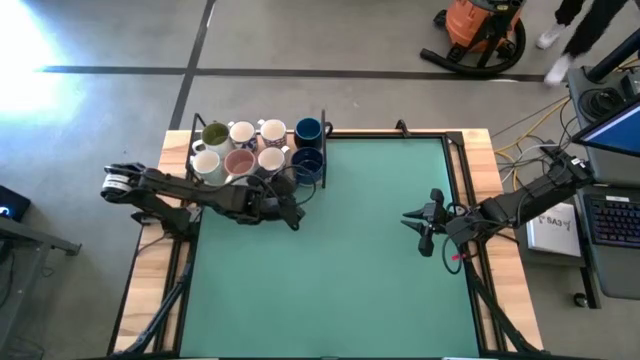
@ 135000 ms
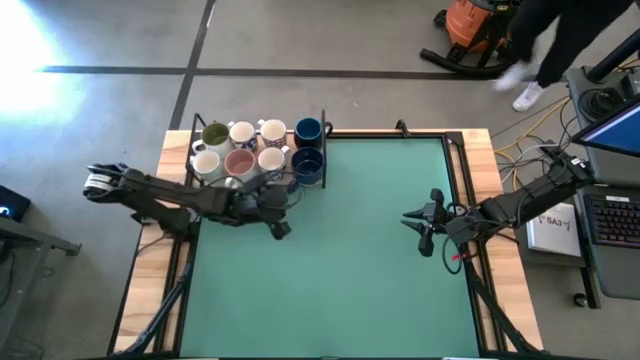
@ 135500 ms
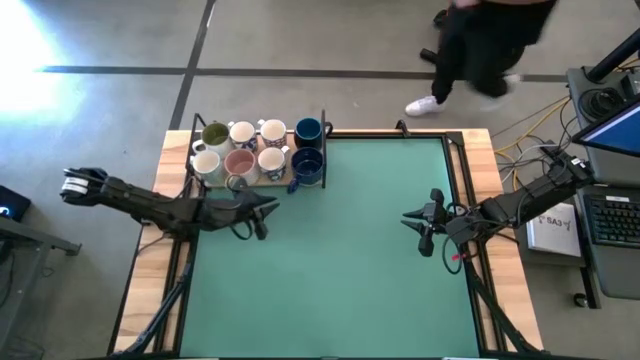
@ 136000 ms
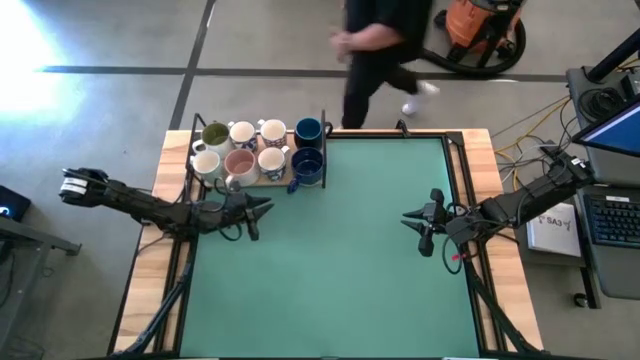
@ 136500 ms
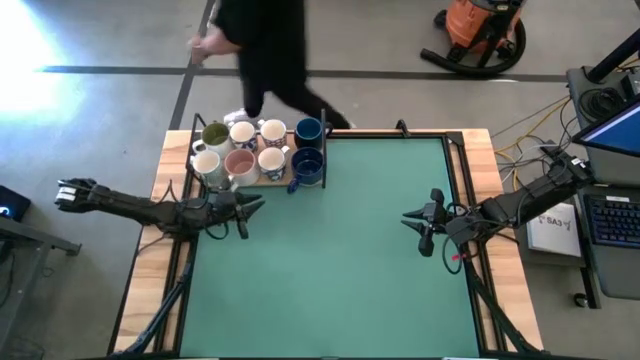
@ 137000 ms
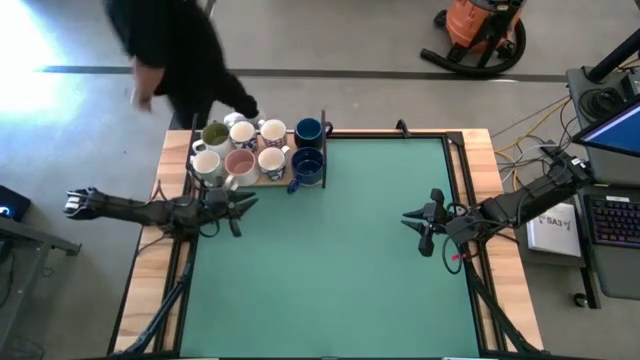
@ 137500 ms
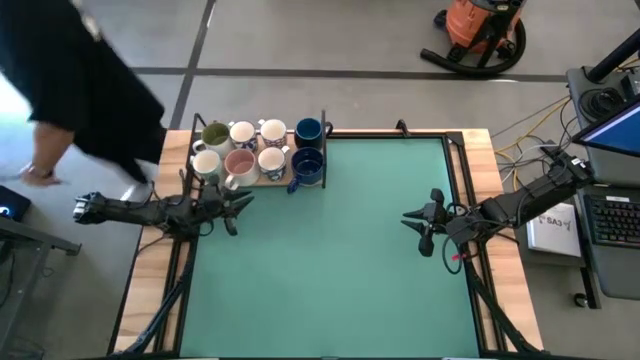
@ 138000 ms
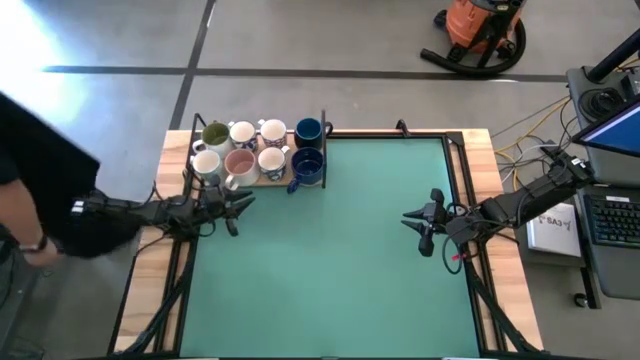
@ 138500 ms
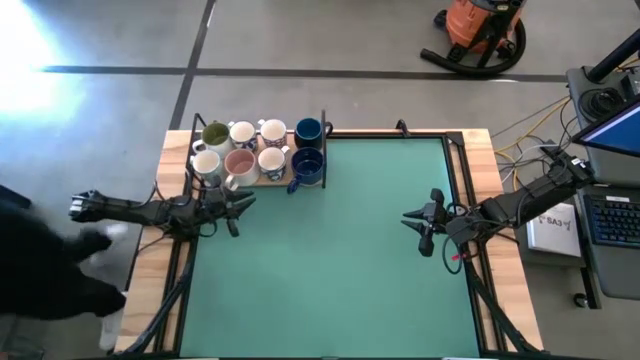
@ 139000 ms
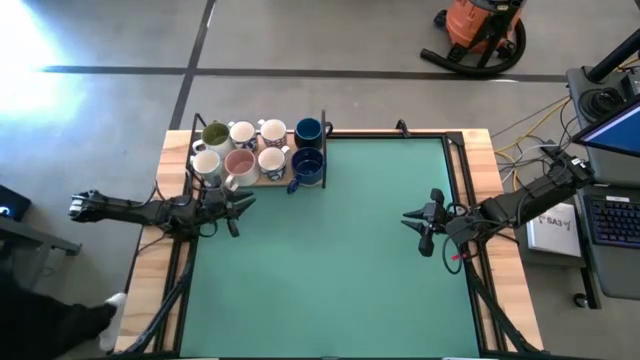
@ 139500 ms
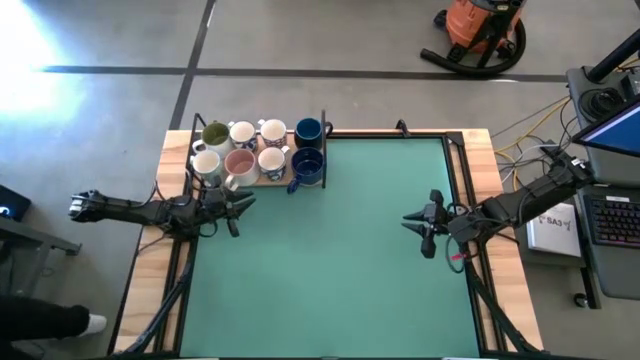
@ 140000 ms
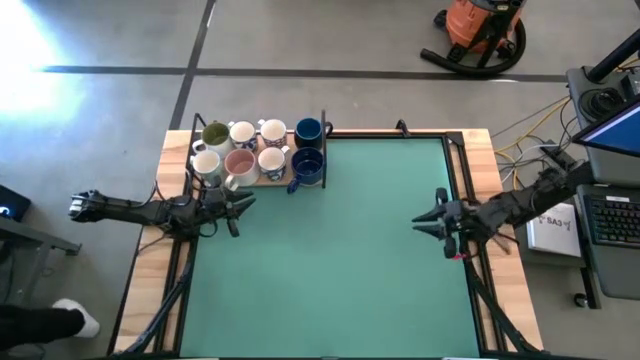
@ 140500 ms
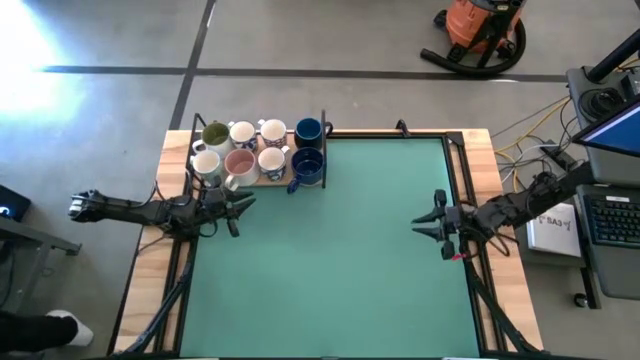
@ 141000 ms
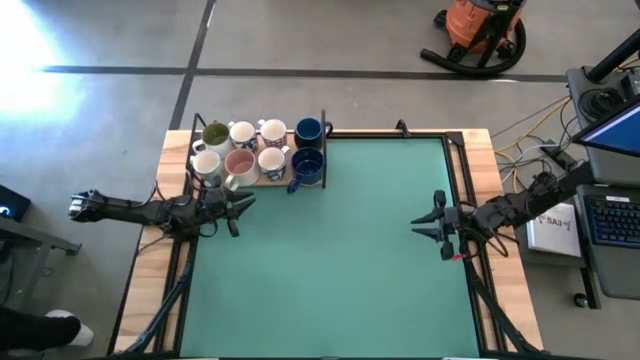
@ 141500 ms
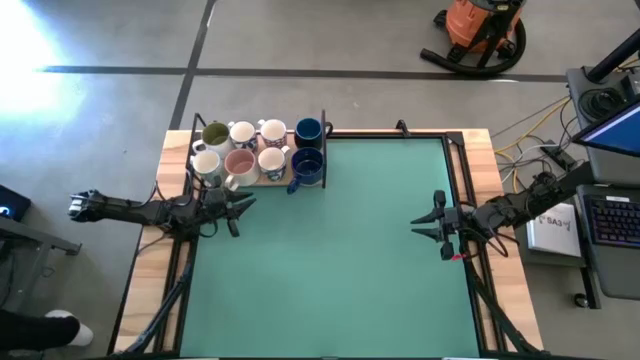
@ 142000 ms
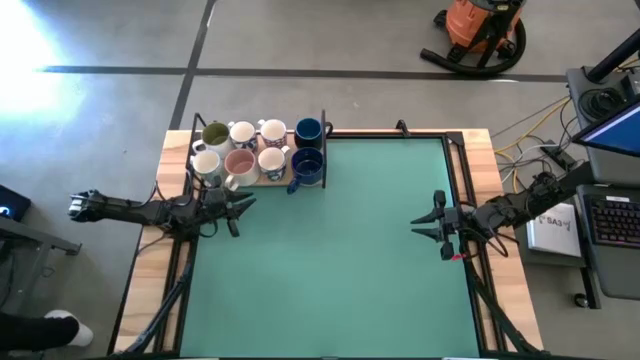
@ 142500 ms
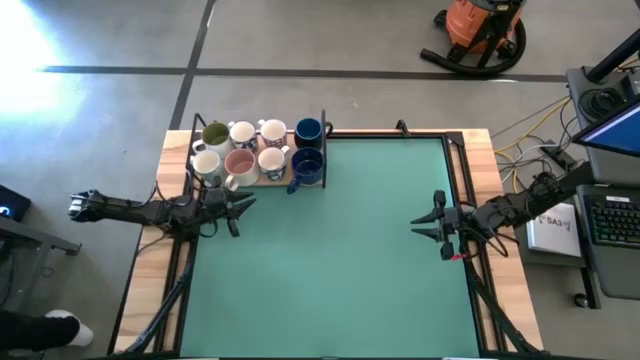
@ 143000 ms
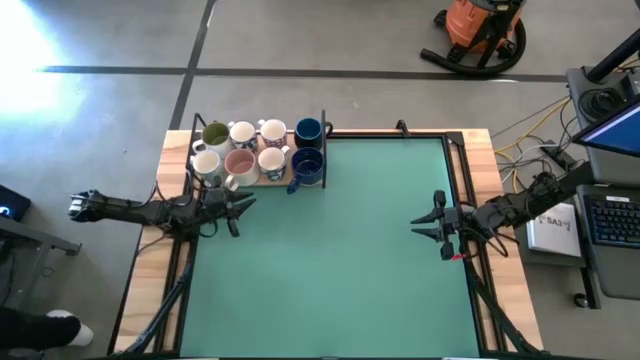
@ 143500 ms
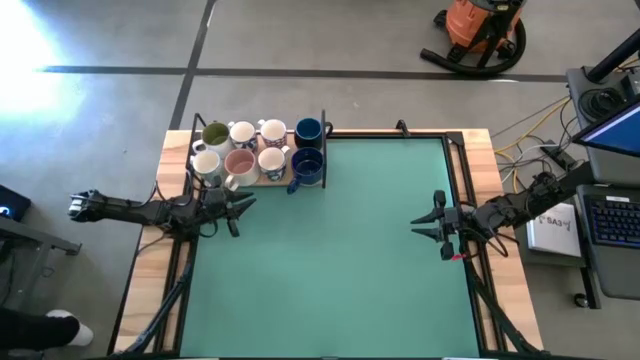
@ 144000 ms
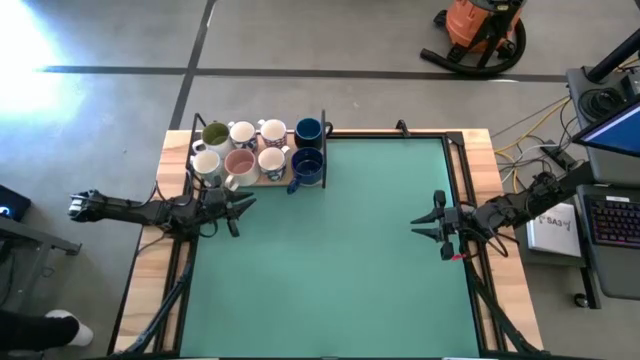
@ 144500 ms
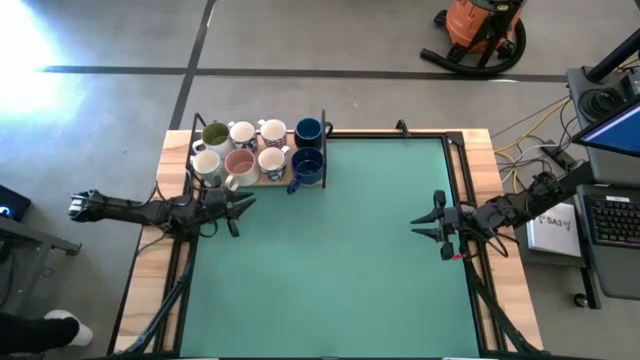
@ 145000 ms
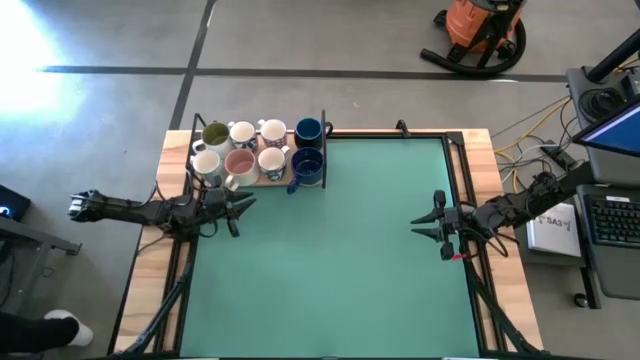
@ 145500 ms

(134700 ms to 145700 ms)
Task: Place coffee mugs
Return to Home Position

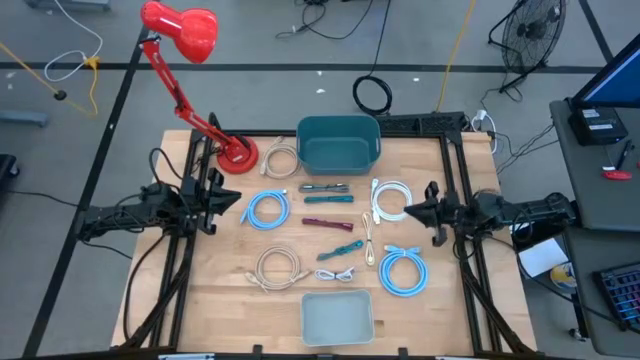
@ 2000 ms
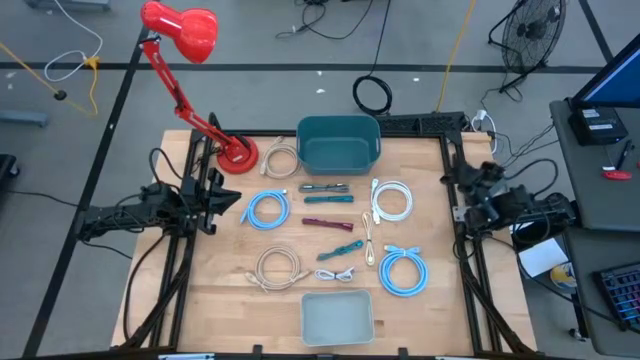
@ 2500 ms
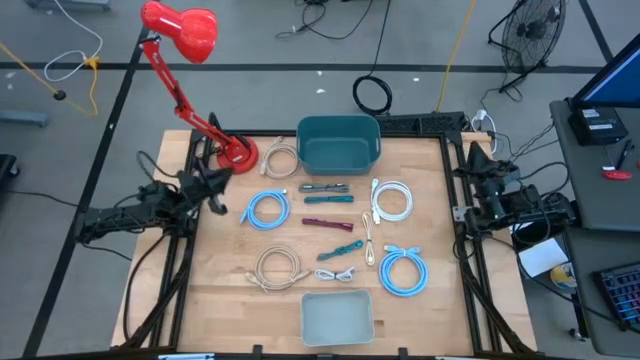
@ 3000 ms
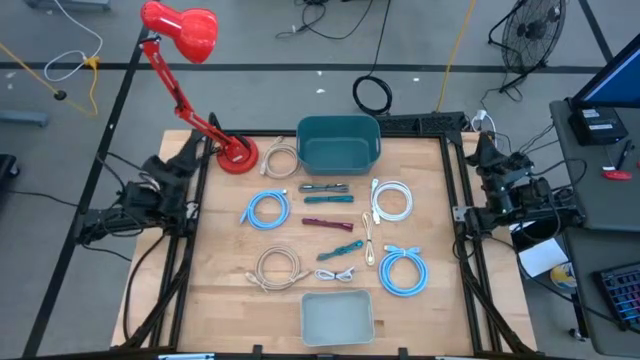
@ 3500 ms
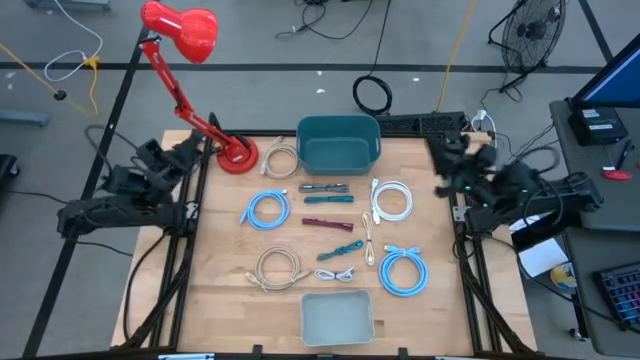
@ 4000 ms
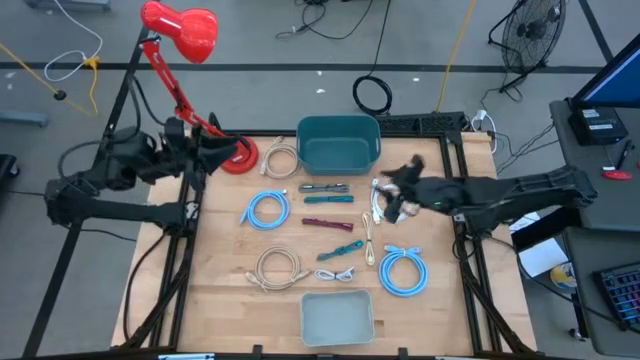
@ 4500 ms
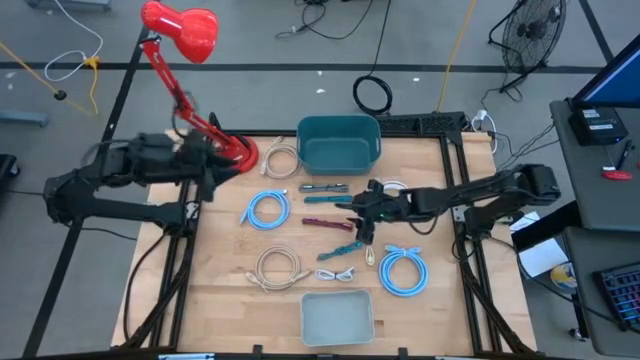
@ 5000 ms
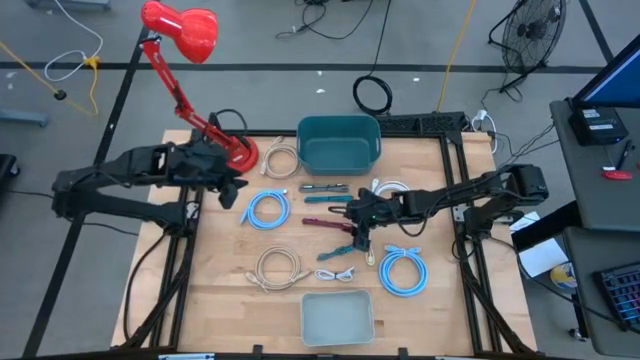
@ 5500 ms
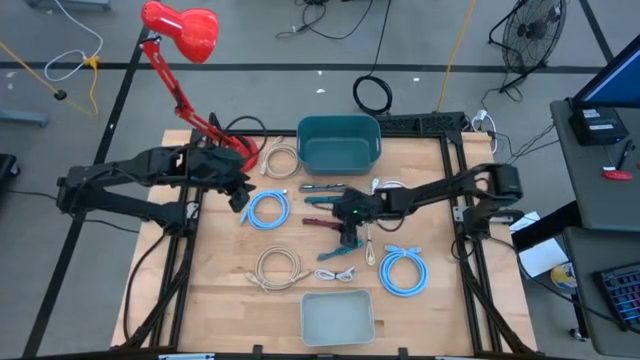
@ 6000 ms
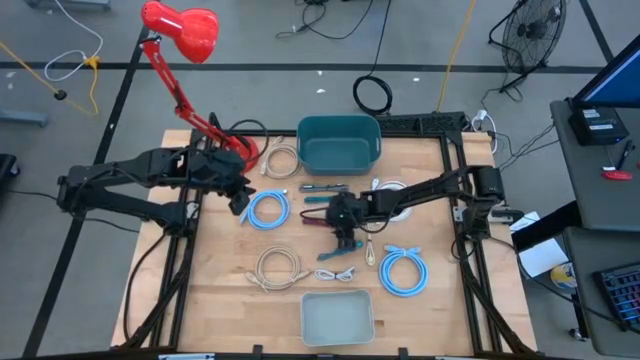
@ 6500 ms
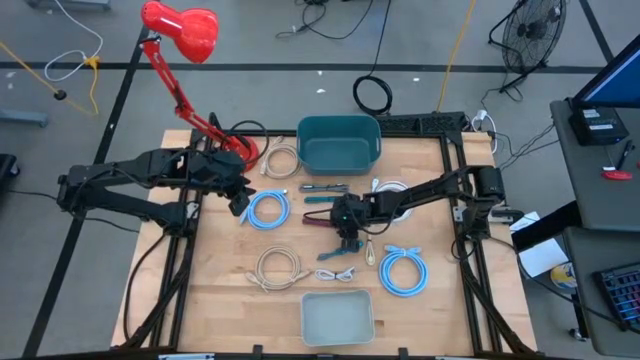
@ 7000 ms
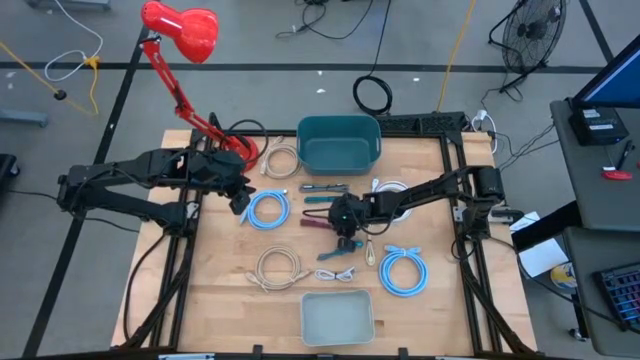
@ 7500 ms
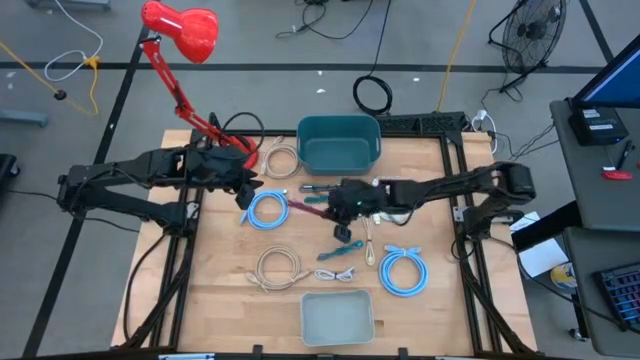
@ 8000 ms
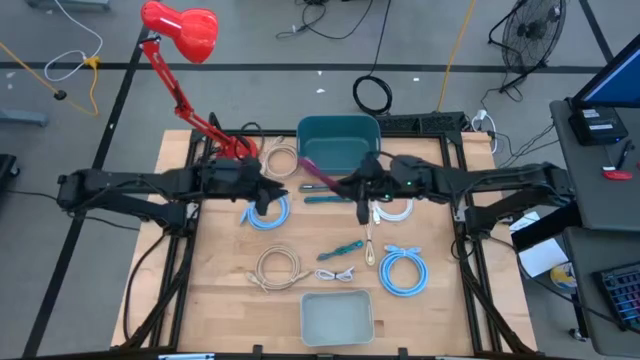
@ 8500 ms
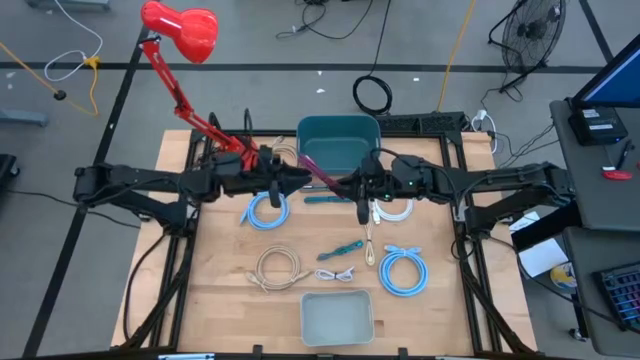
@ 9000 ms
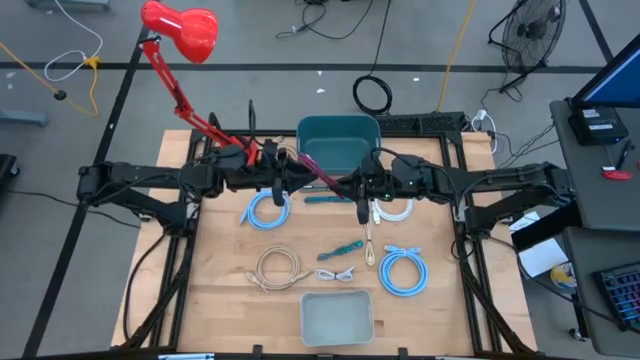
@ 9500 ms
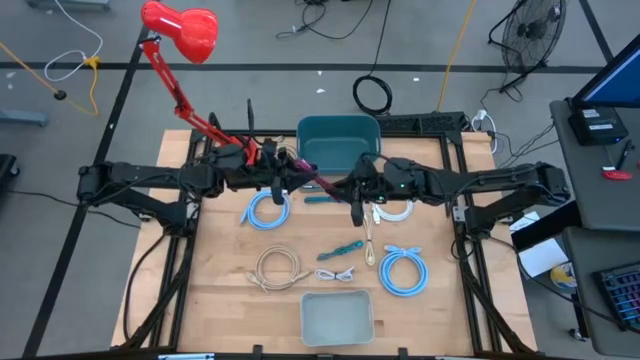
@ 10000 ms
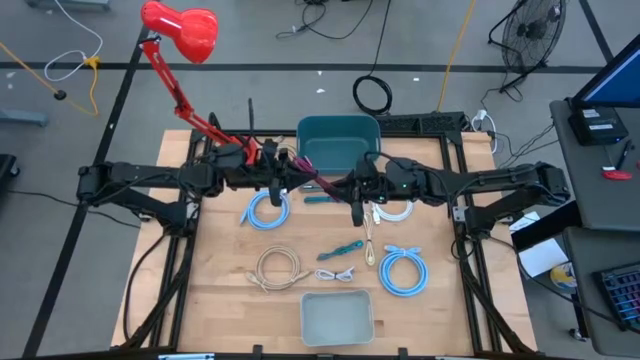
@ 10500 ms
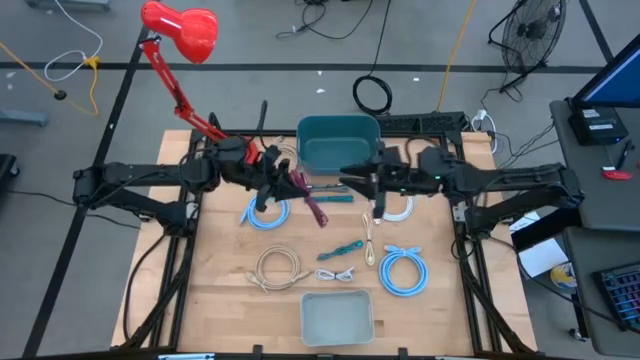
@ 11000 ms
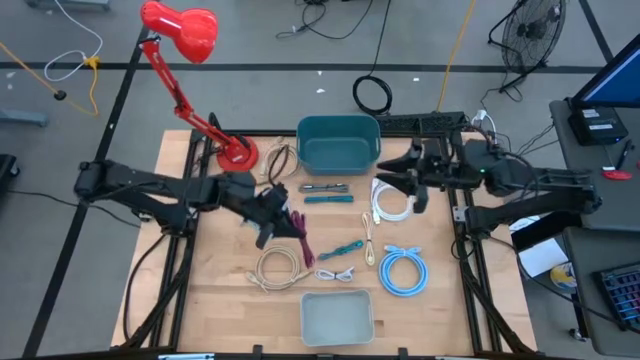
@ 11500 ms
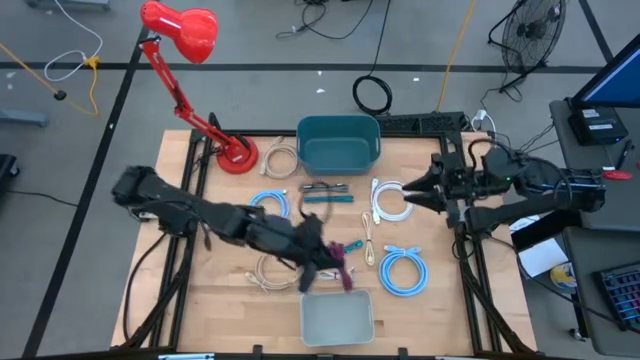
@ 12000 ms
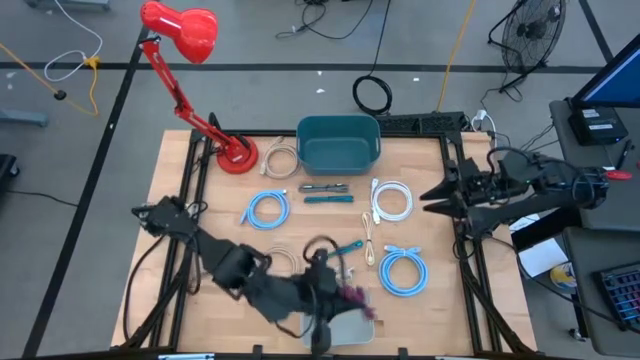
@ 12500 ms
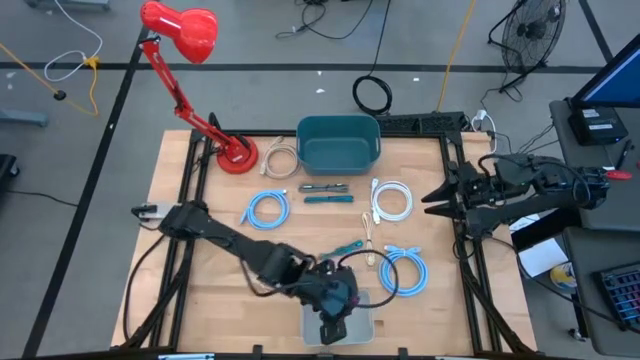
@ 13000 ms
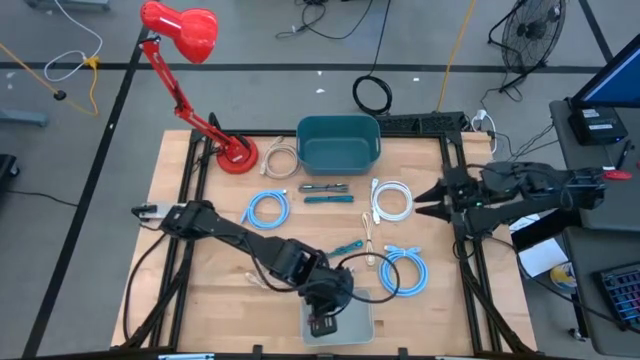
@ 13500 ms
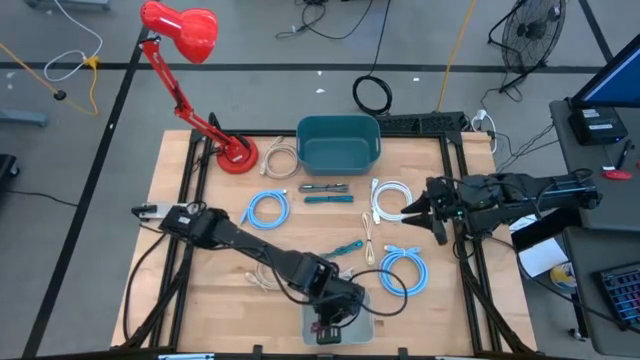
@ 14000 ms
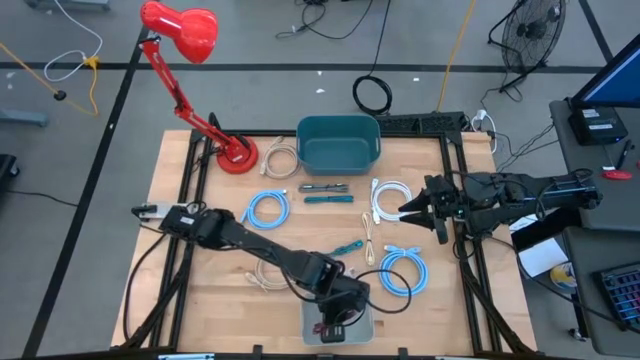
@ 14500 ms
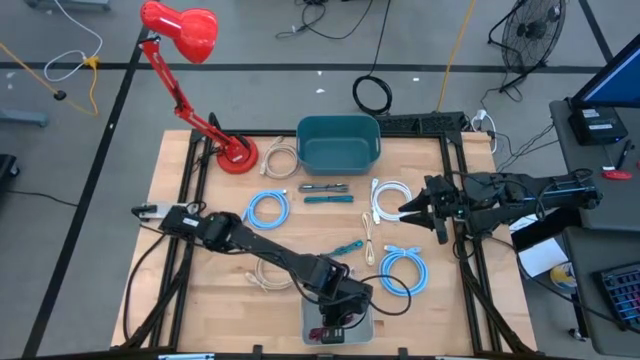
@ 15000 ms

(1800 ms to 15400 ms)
Task: Pick & Place USB Port
Put the pink charger cable into the gray bin
